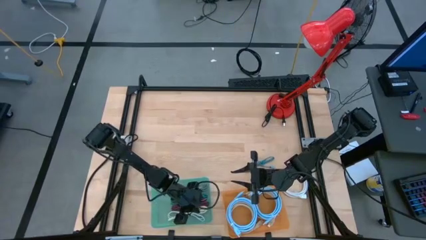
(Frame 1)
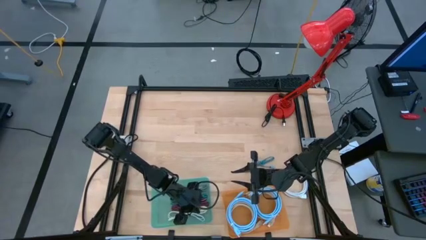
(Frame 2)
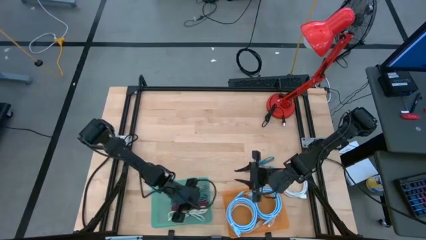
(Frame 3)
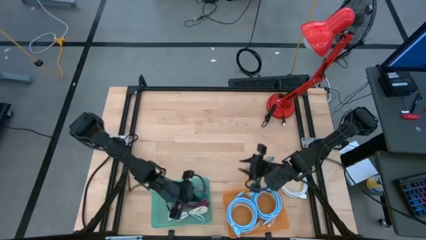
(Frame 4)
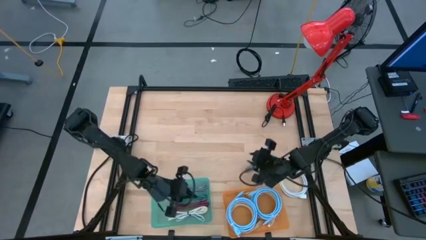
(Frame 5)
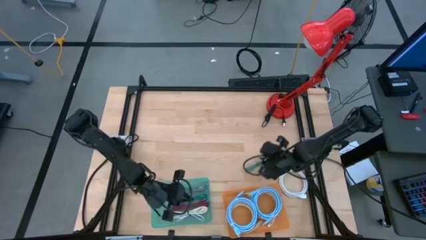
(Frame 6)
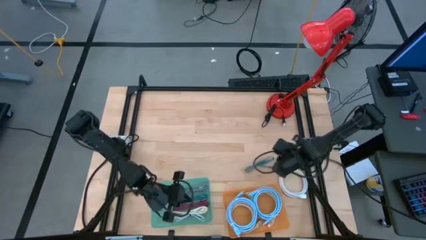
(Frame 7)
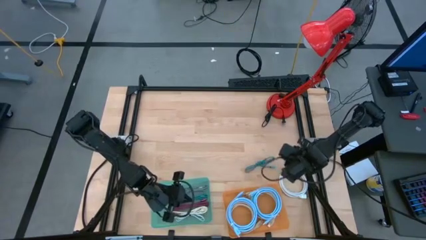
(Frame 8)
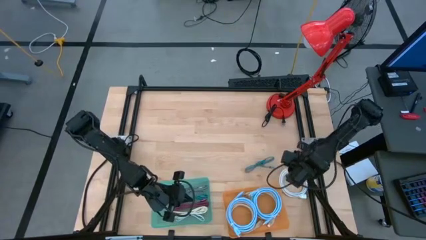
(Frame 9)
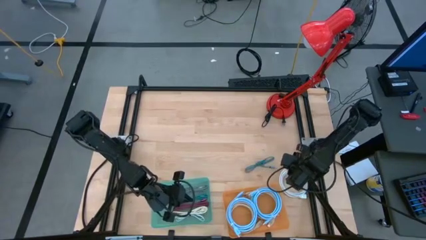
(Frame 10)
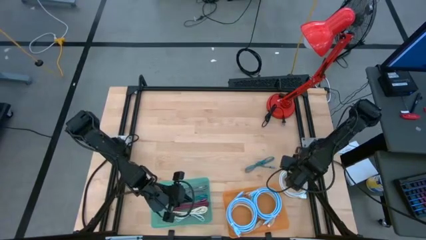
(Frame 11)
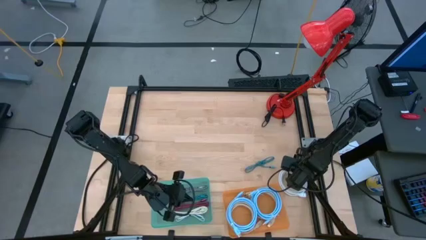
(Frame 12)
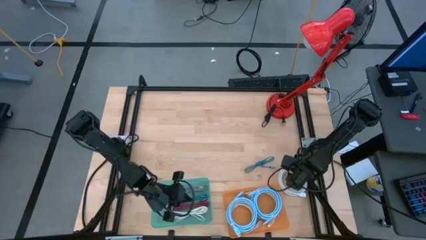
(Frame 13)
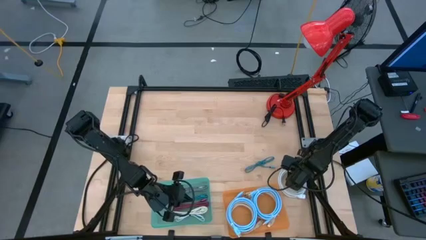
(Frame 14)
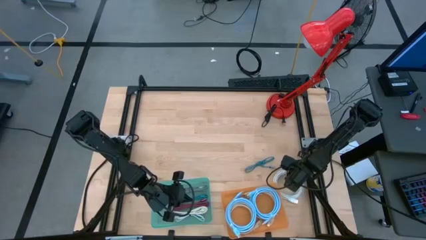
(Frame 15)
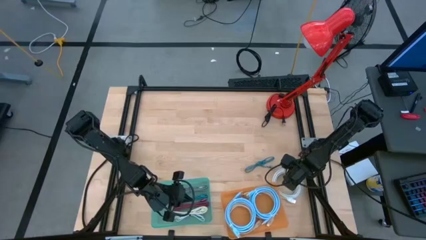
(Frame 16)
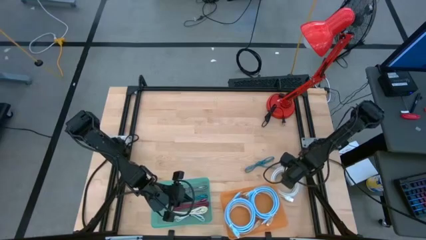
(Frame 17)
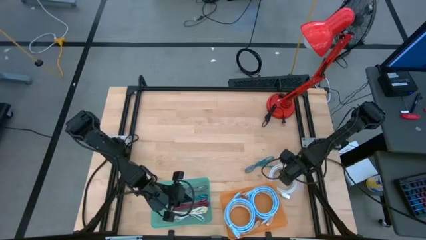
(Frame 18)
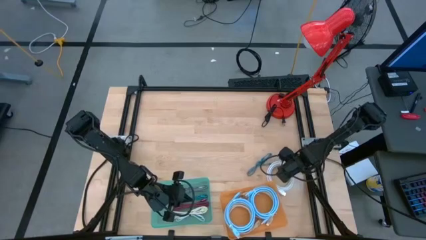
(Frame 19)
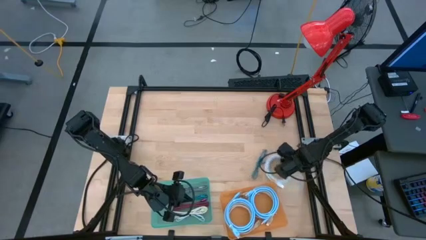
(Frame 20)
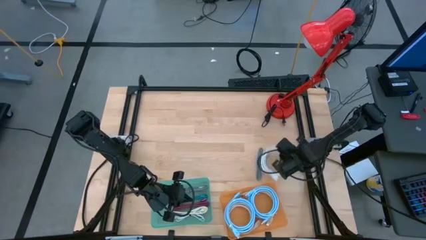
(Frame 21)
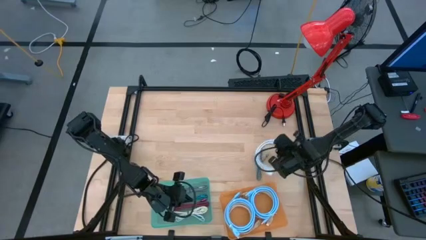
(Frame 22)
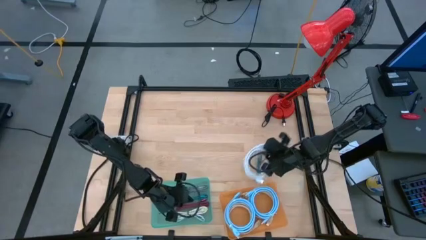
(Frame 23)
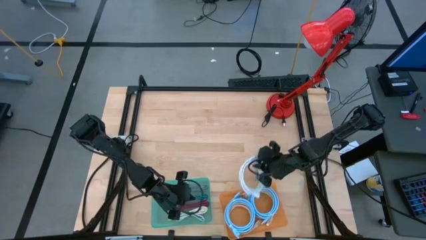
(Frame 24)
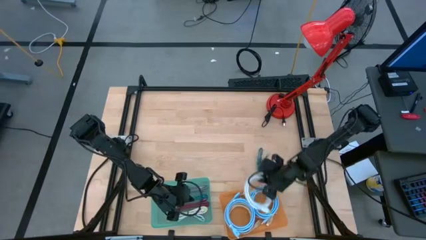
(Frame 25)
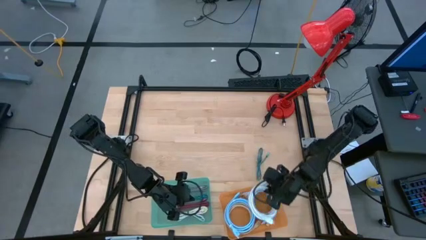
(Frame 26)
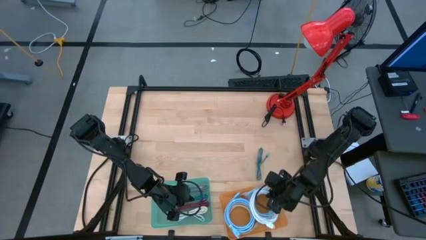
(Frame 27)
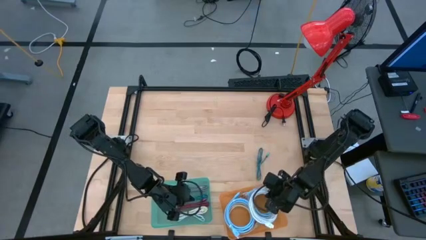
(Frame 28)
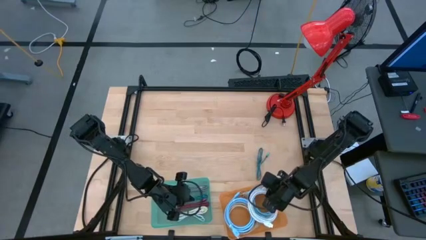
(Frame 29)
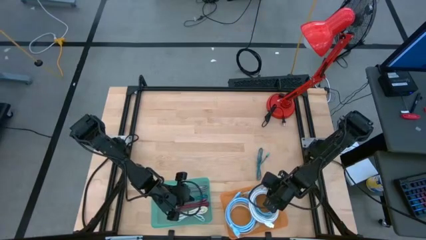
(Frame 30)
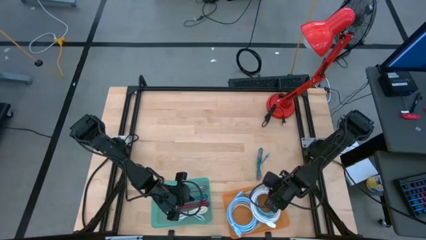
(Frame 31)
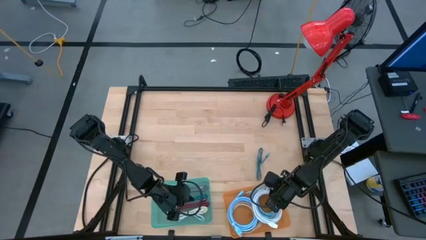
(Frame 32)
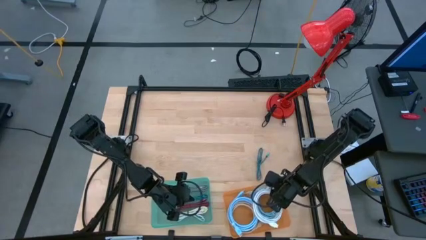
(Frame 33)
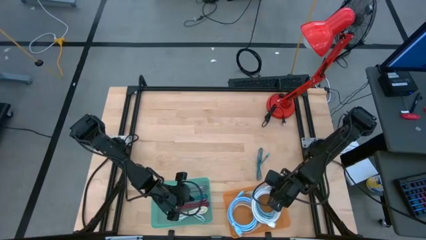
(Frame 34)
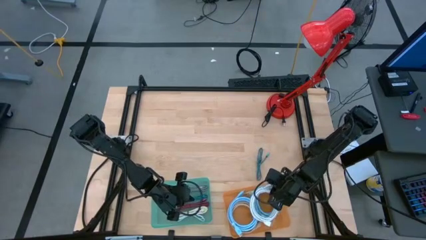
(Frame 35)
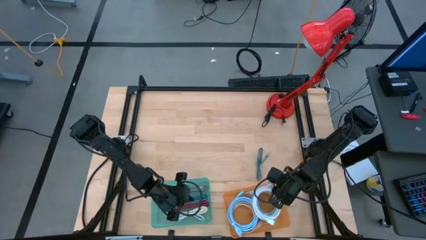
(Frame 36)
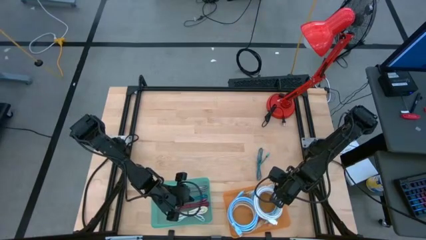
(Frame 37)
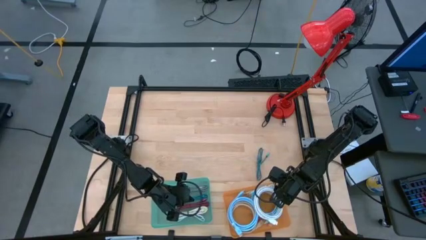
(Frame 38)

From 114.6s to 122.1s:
Task: Pick & Place USB Port
Put the white HDMI cable into the orange bin

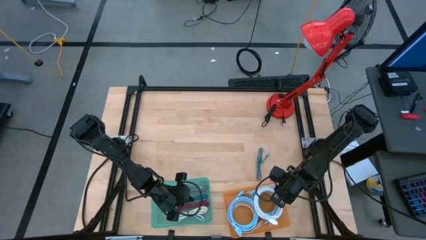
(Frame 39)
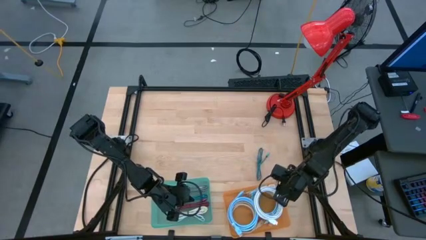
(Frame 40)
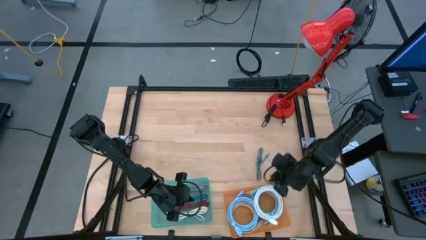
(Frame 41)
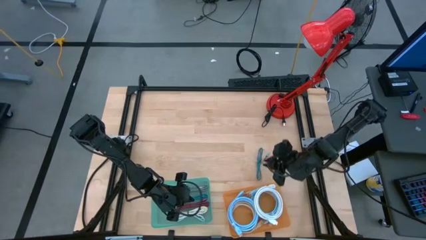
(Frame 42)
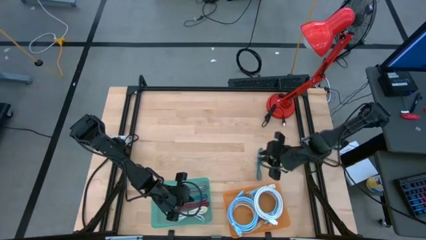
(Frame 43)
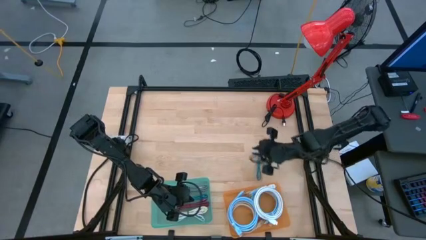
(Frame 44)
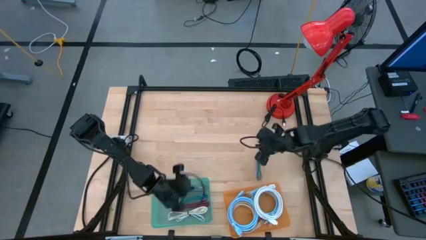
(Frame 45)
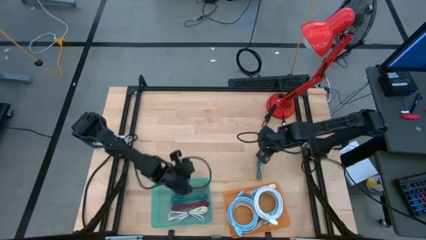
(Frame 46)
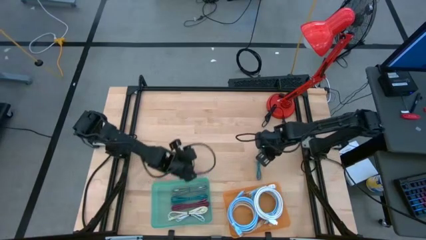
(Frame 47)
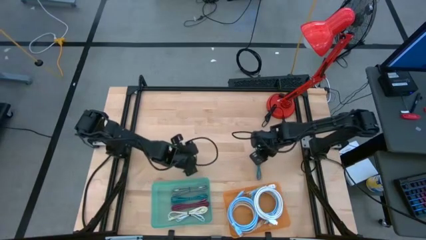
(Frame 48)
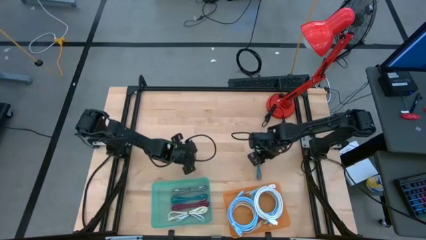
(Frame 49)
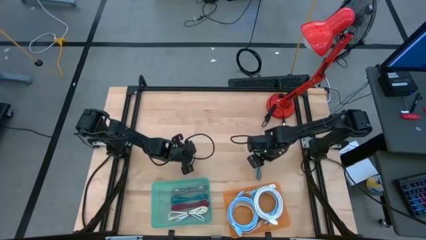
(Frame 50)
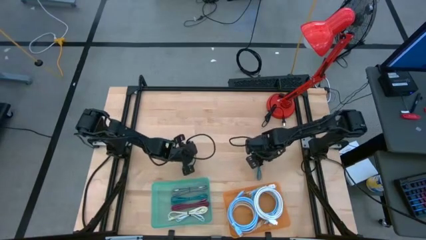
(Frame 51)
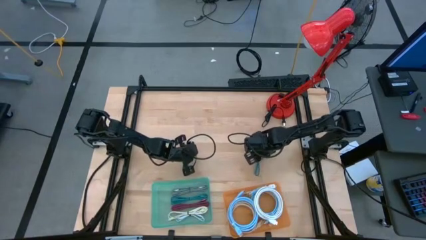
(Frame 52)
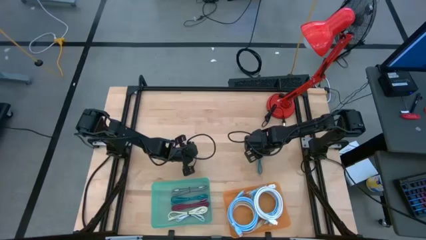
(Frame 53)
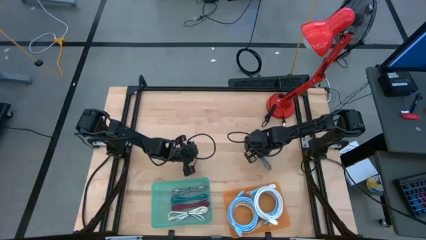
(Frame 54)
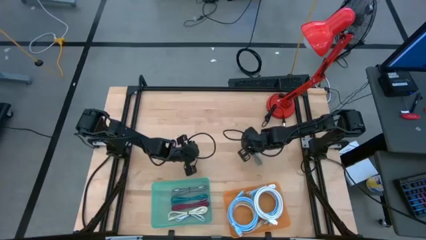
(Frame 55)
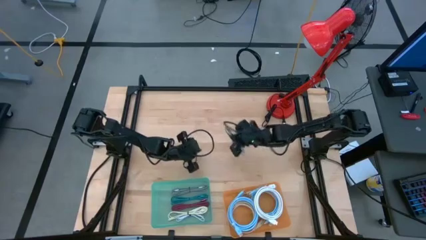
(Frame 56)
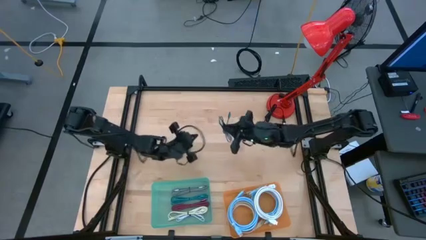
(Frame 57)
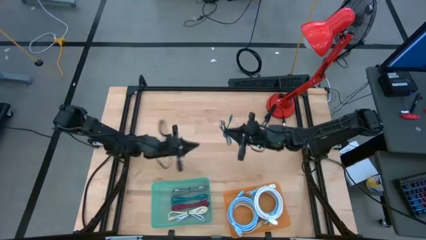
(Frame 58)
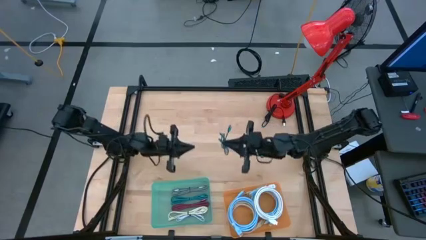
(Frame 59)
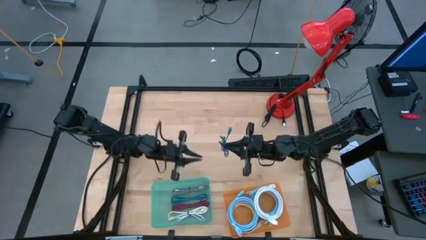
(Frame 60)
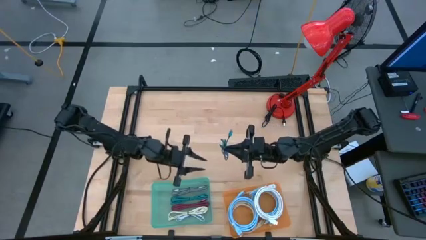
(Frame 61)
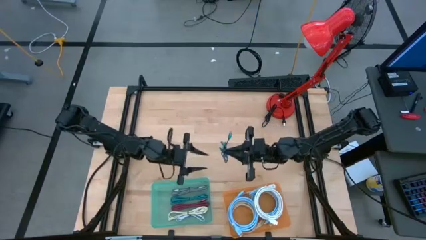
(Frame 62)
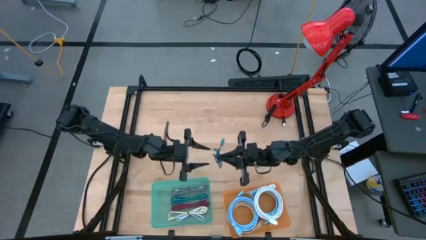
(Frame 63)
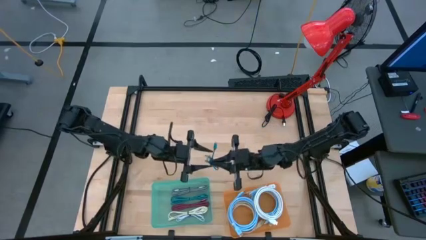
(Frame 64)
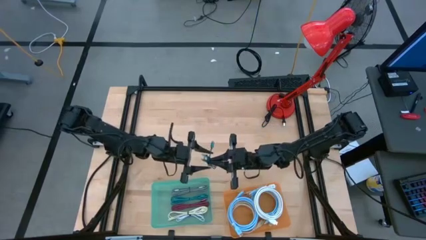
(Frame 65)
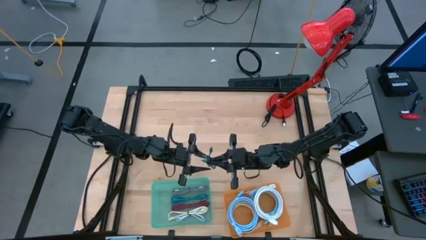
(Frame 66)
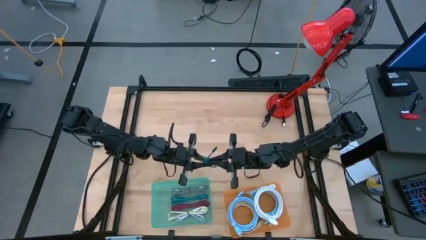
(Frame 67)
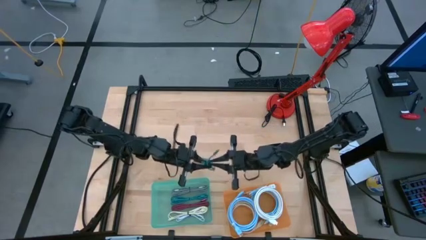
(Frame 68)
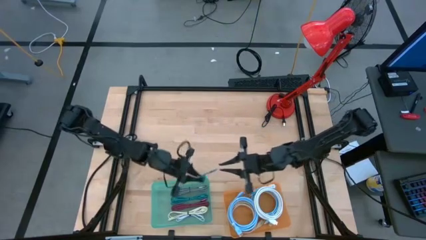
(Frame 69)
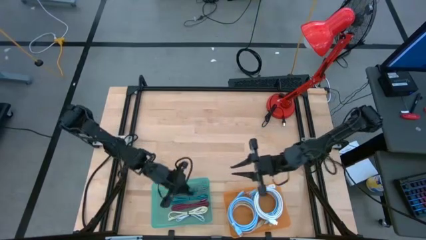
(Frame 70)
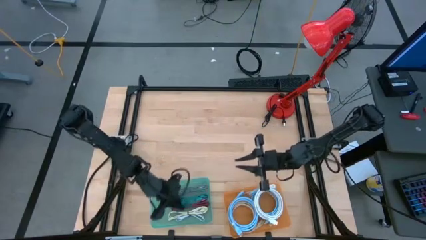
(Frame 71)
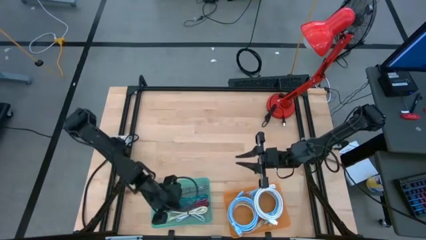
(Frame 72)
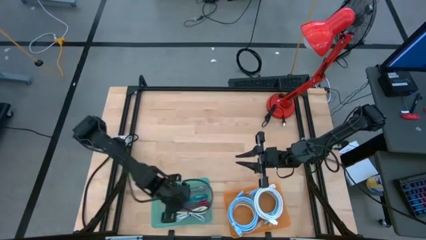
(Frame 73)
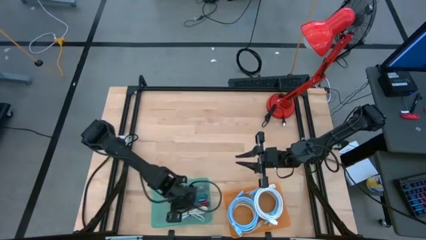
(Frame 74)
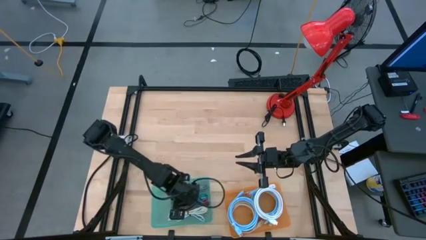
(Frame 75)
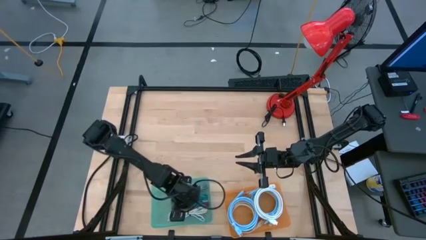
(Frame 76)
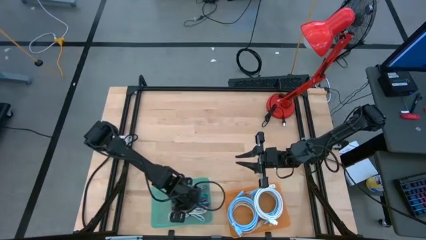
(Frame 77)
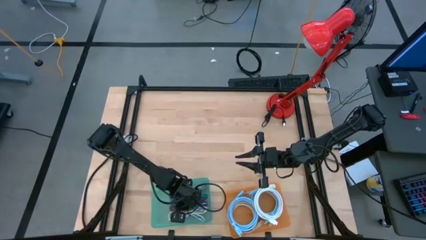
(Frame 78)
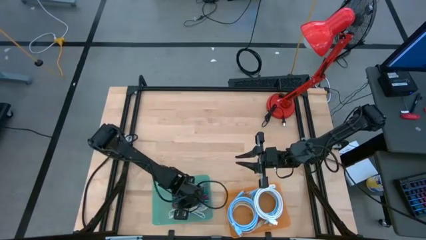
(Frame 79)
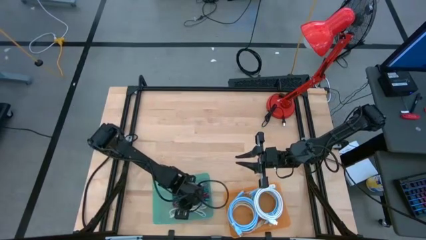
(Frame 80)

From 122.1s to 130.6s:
Put the blue charger cable into the green bin
